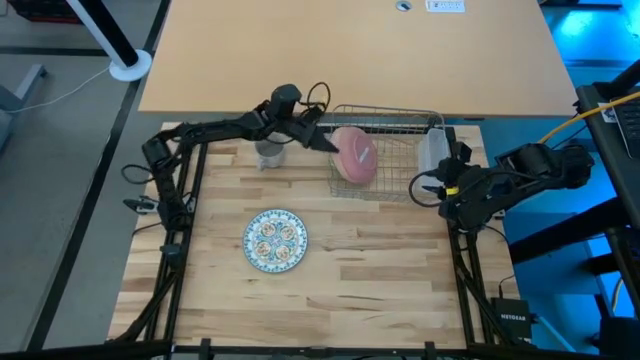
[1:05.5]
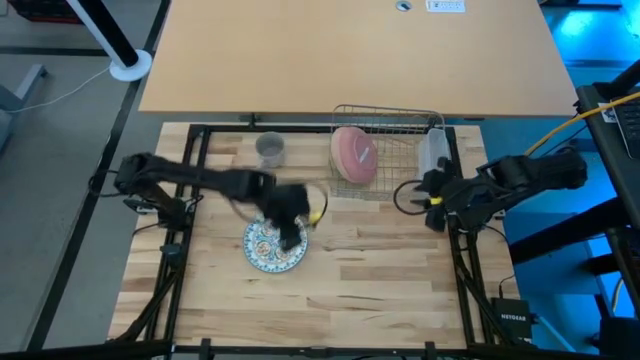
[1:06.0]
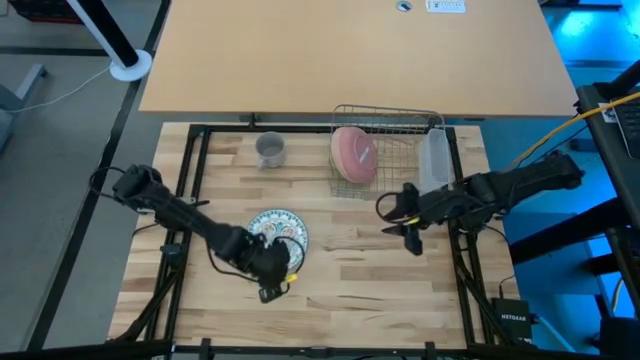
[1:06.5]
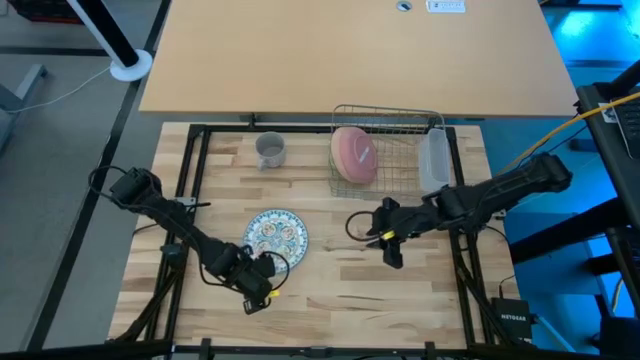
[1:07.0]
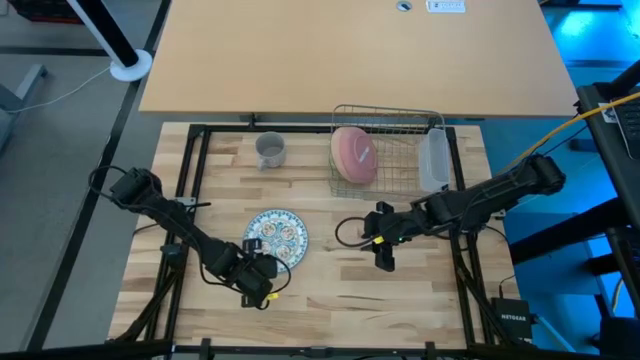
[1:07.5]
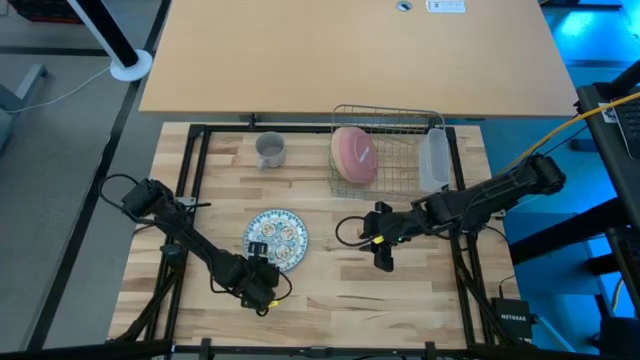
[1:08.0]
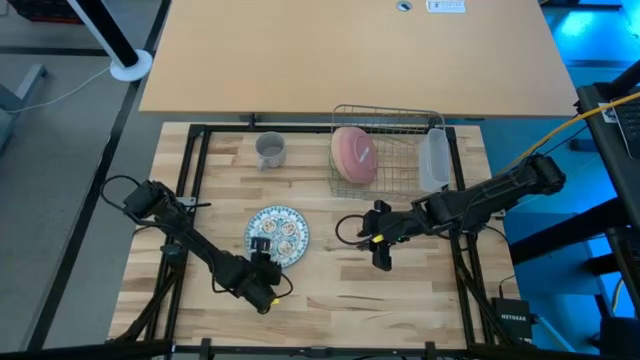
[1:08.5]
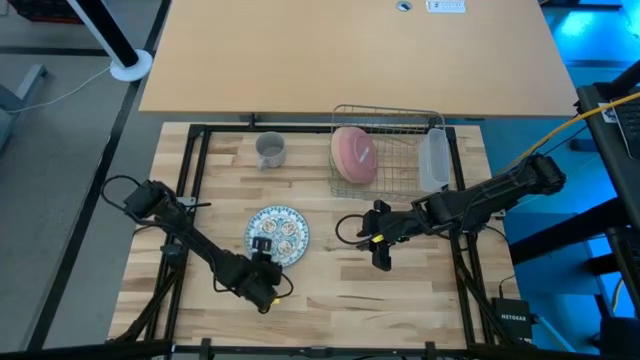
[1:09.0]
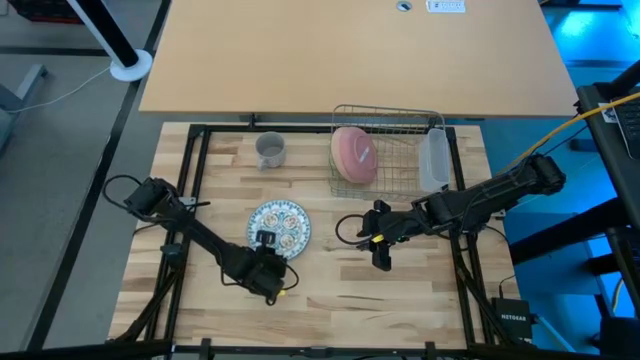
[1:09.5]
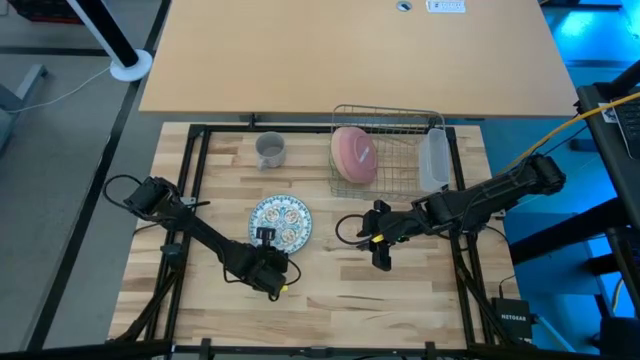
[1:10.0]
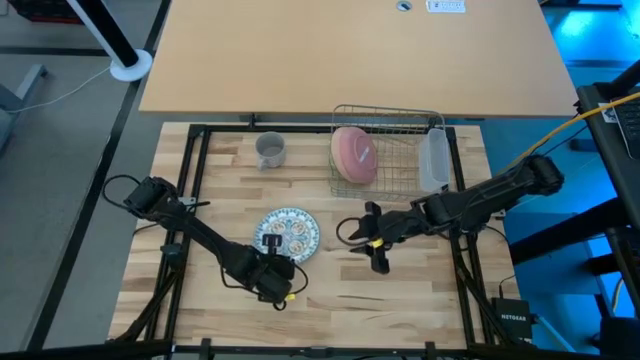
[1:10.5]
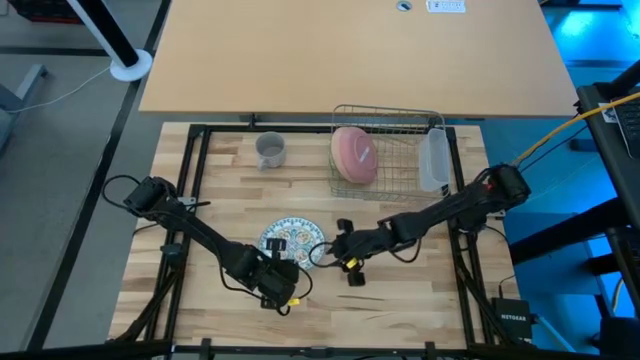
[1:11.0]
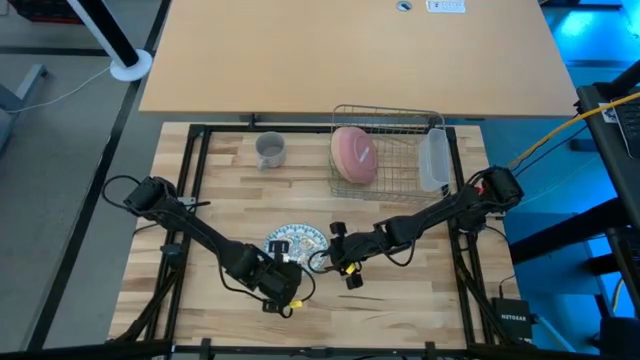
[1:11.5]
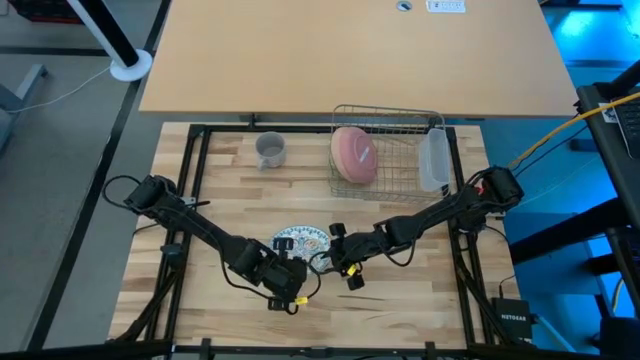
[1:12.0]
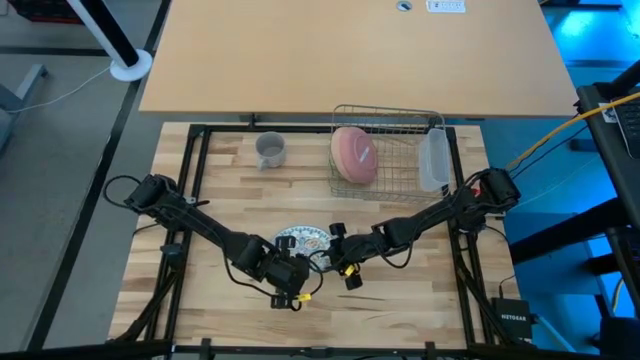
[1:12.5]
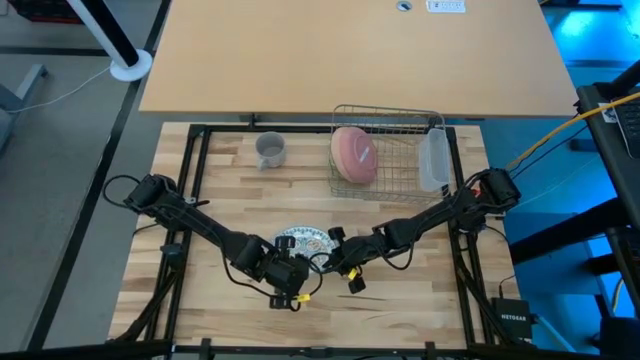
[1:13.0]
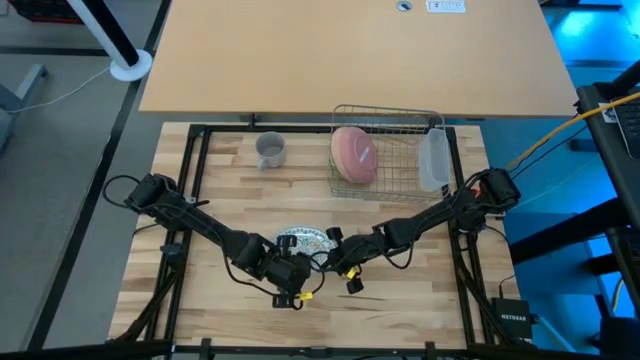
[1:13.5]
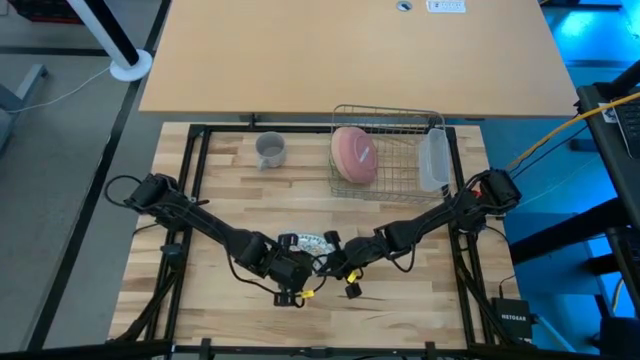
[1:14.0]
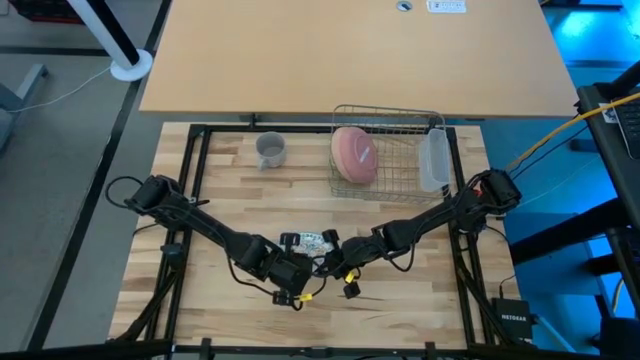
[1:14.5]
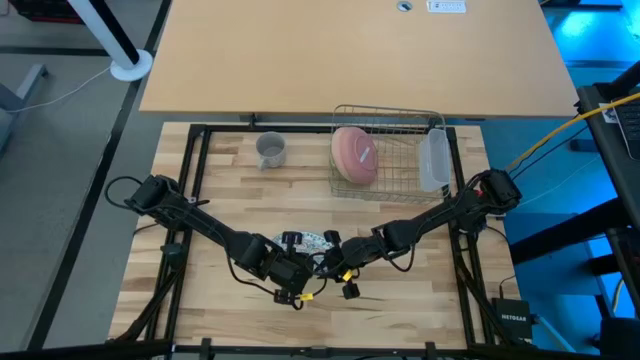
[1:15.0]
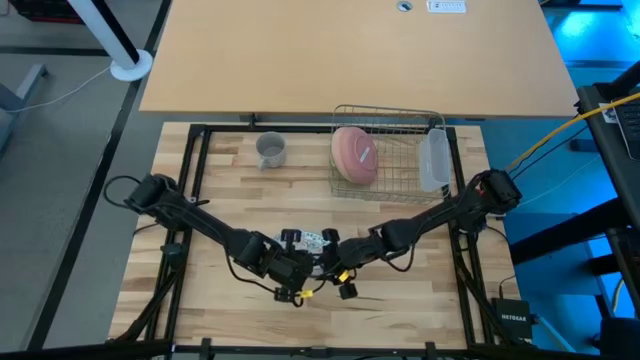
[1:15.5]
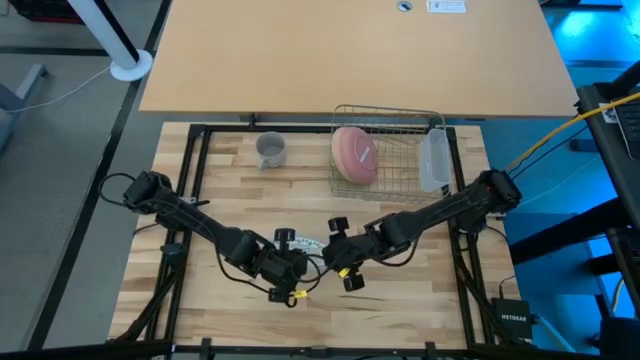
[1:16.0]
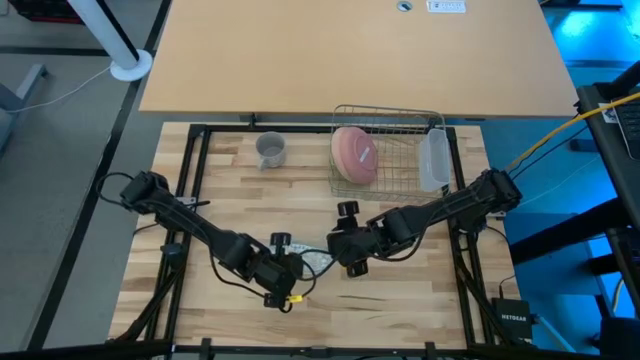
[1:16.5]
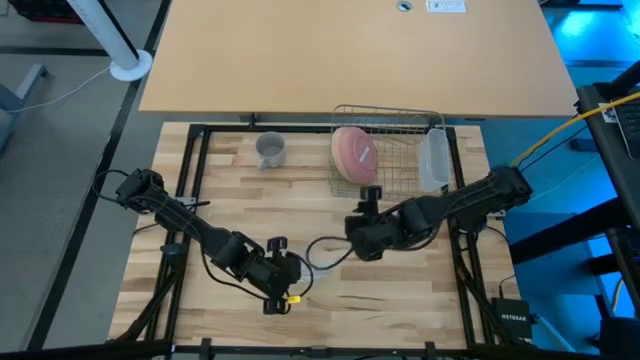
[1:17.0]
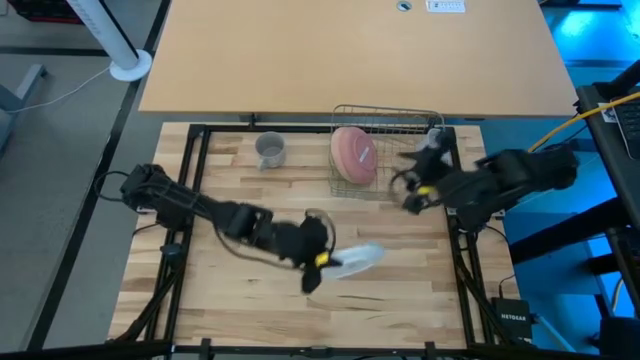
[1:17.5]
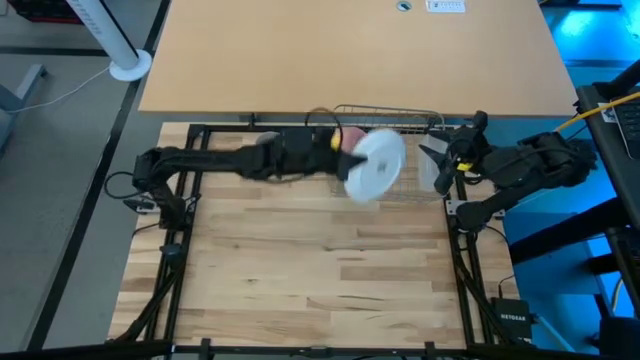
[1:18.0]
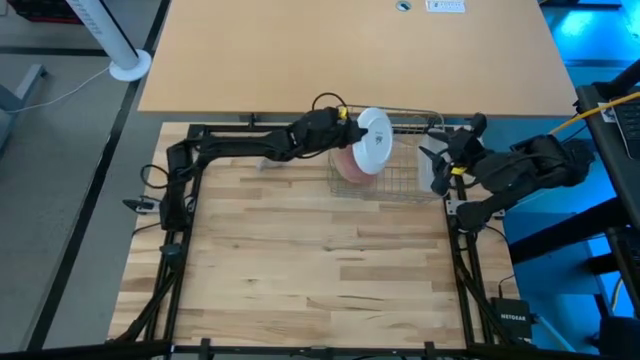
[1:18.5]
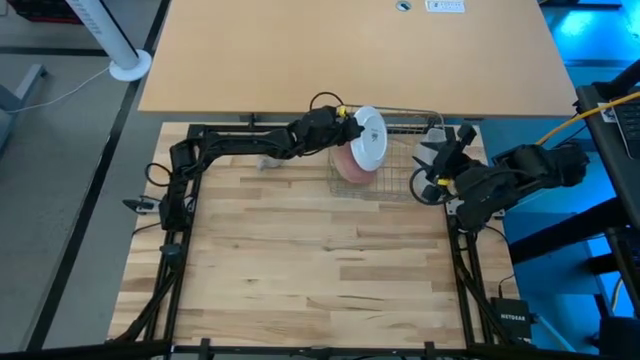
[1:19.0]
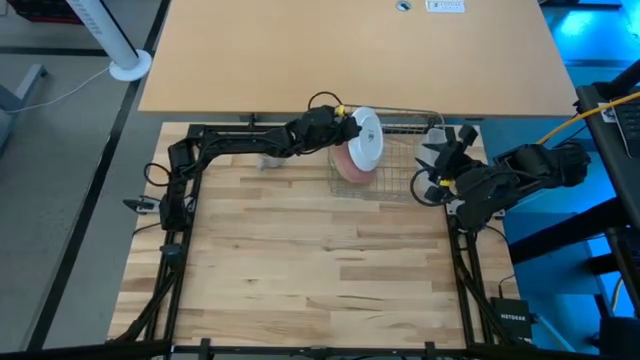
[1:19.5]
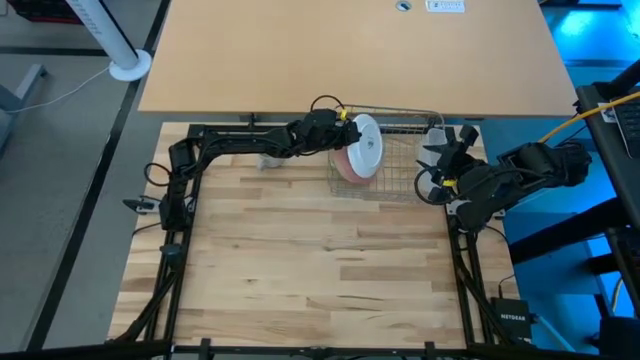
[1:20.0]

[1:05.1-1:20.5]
Task: Sort dishes
Put the white plate into the dish rack

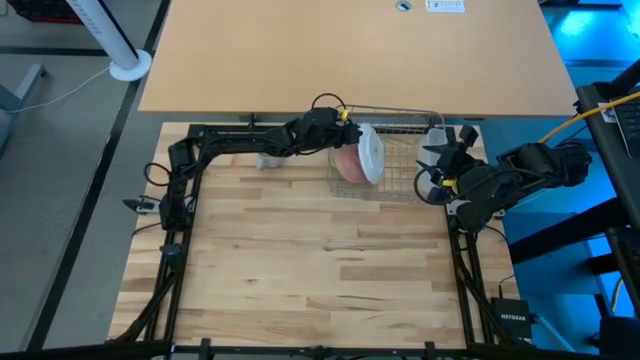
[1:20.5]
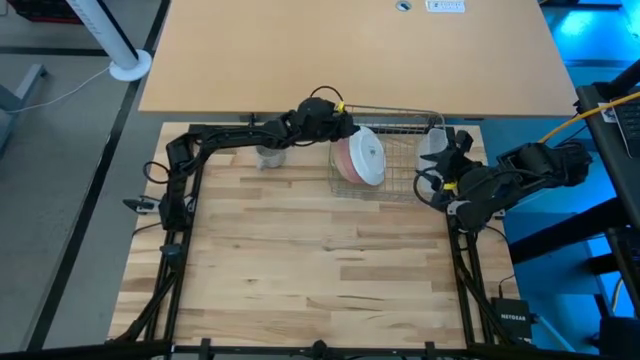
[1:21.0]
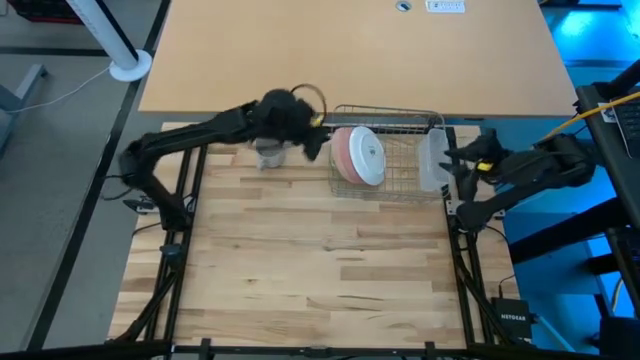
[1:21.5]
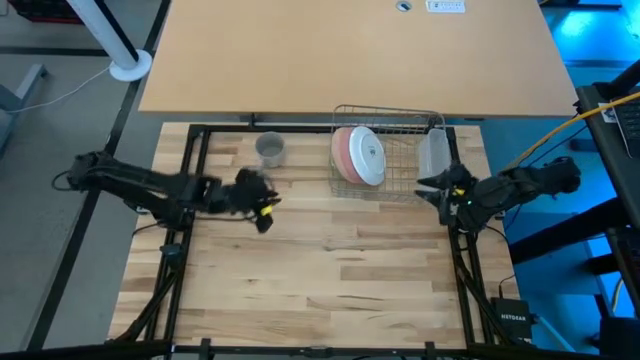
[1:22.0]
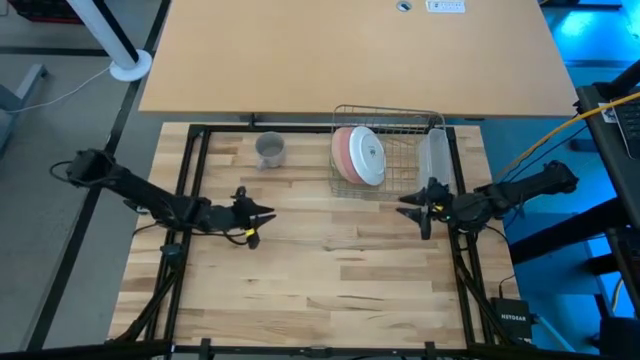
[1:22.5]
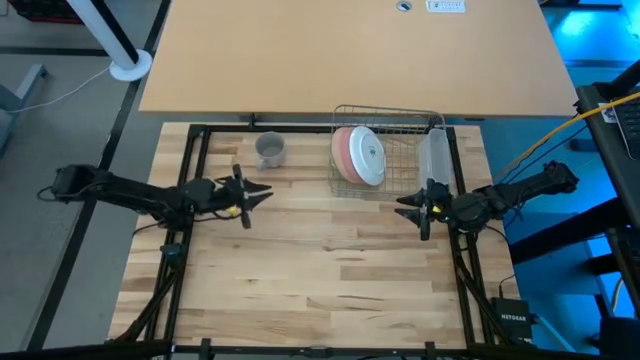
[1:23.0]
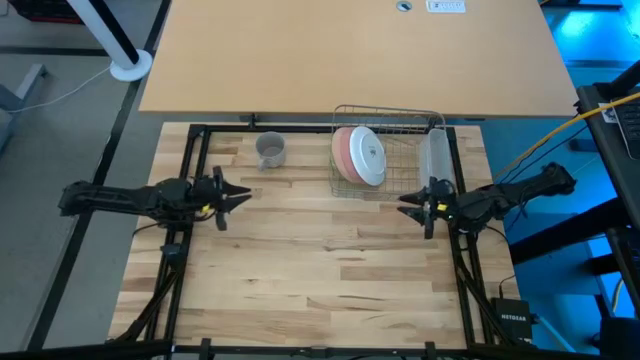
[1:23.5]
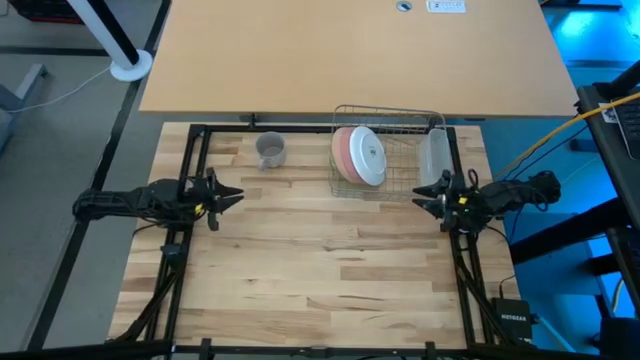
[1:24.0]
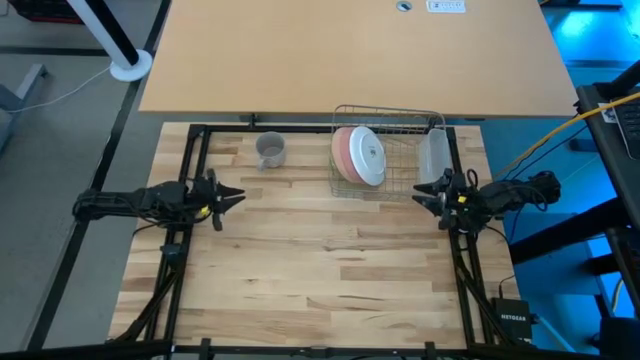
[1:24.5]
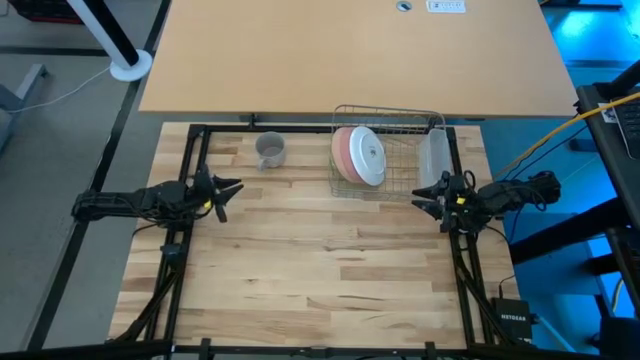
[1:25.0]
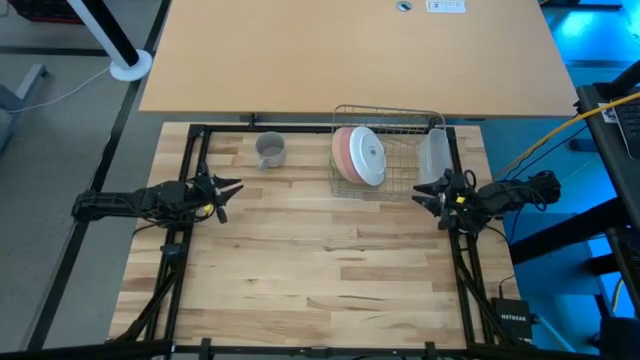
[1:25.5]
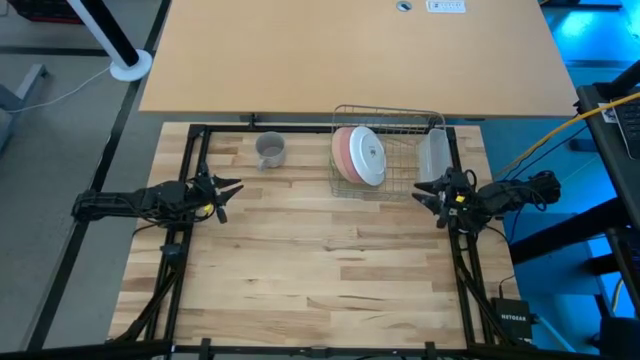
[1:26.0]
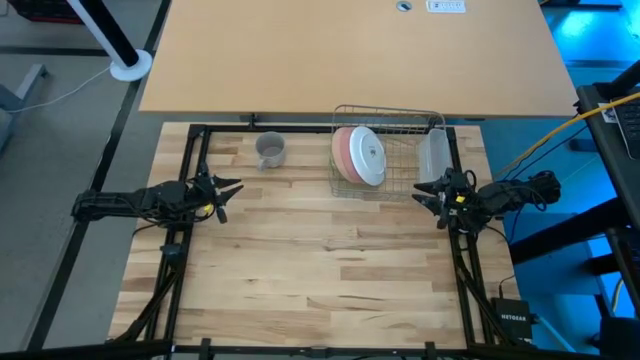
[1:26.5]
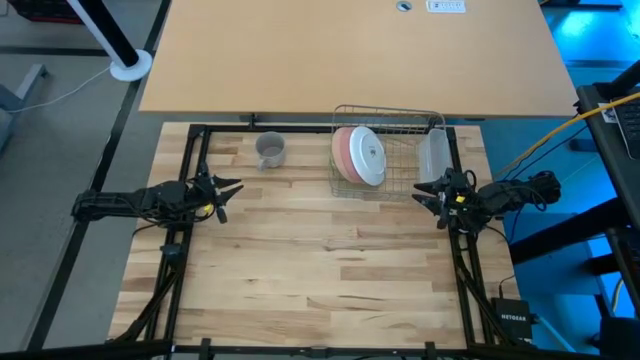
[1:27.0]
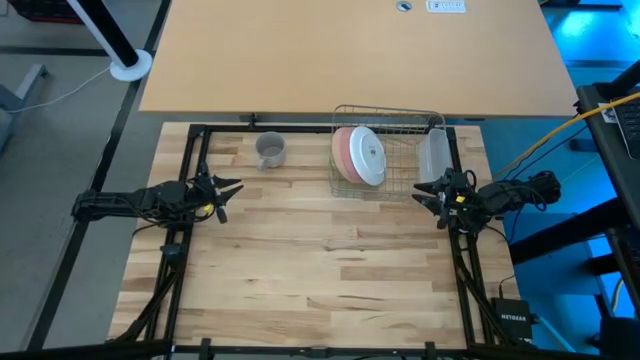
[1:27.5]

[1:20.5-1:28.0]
Return to Home Position
